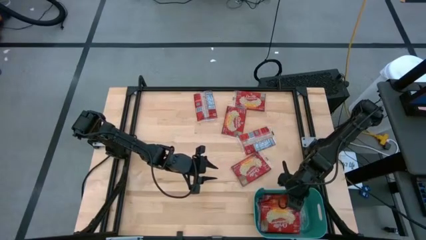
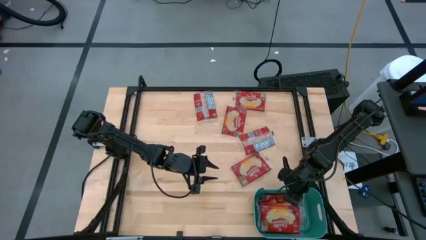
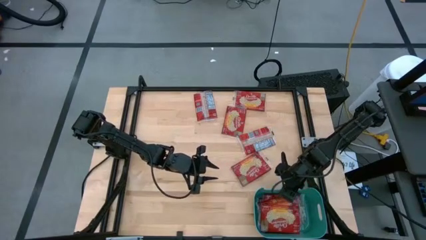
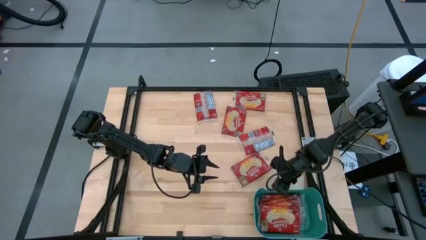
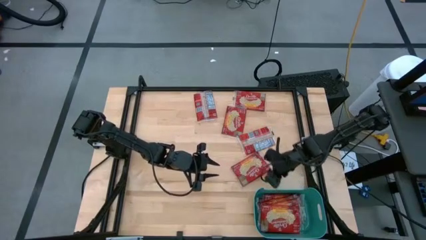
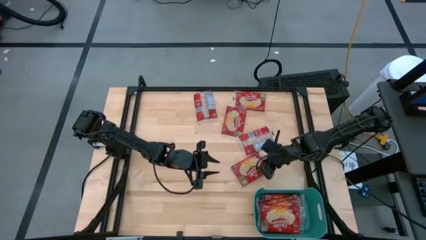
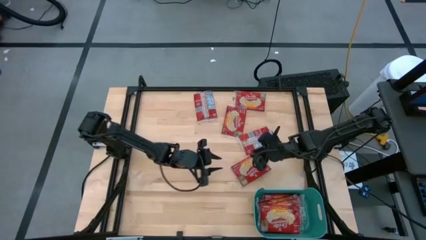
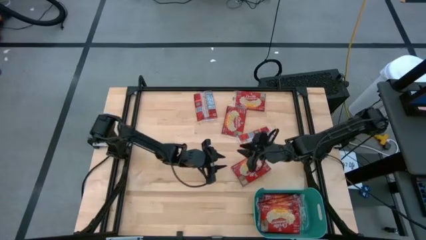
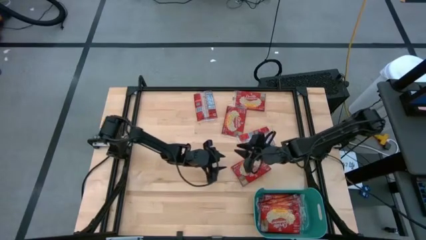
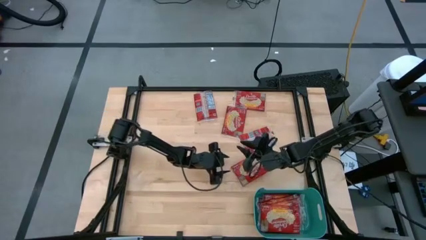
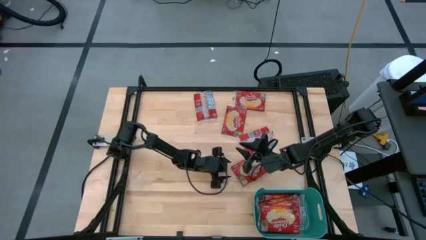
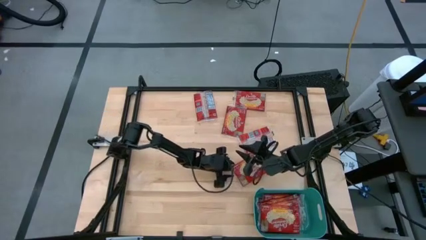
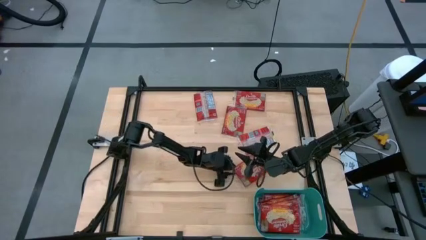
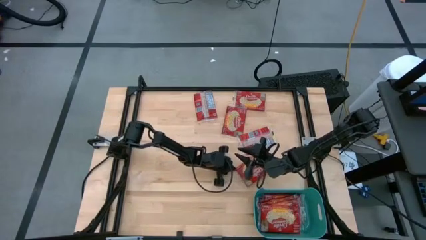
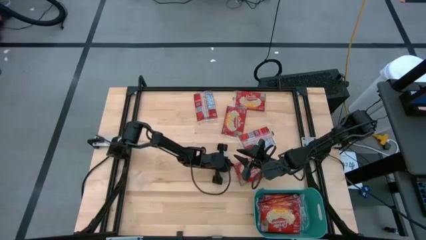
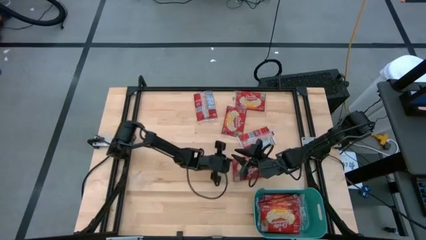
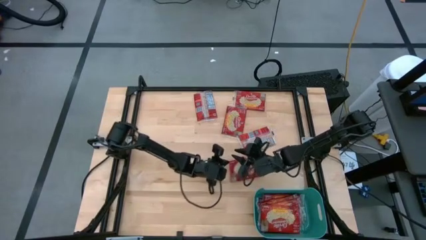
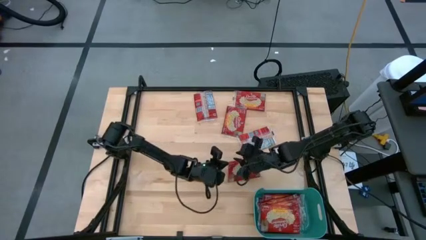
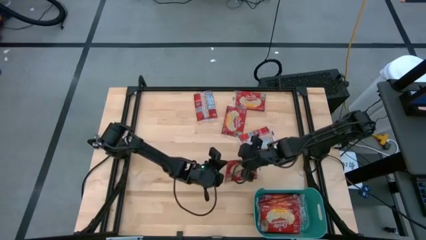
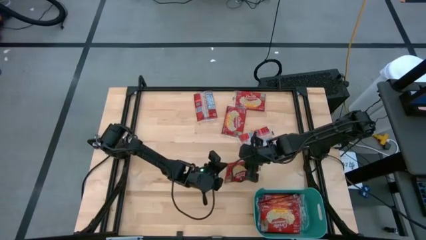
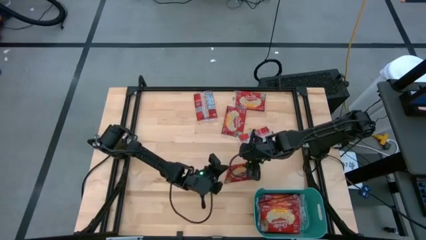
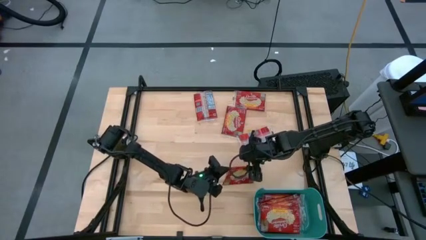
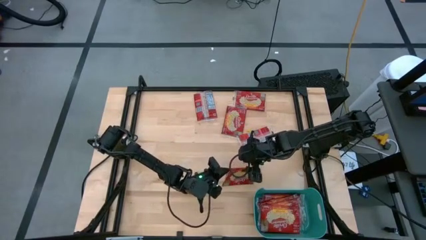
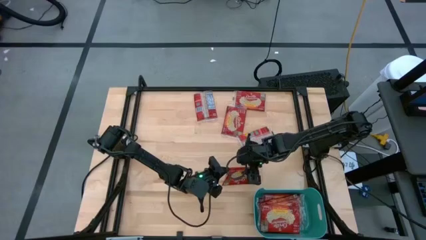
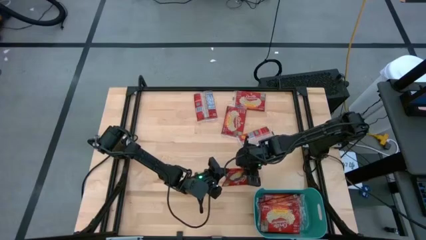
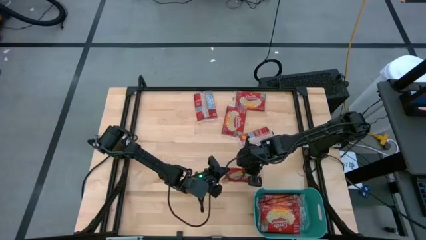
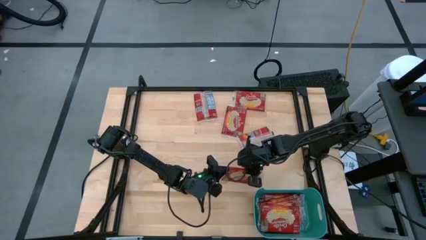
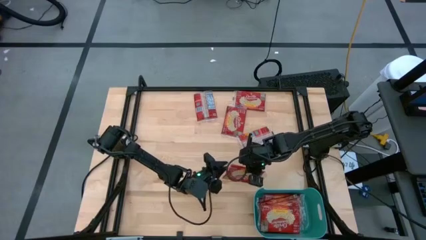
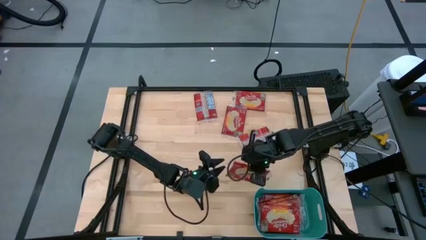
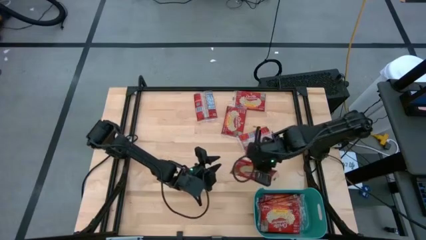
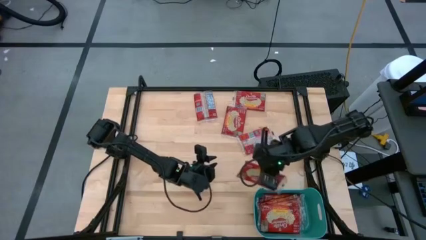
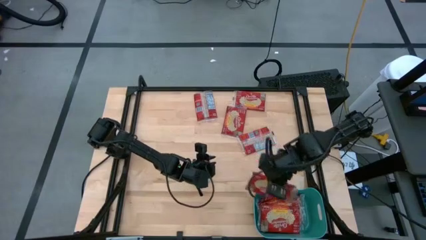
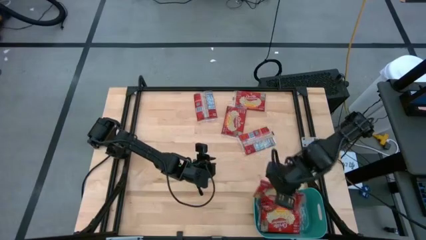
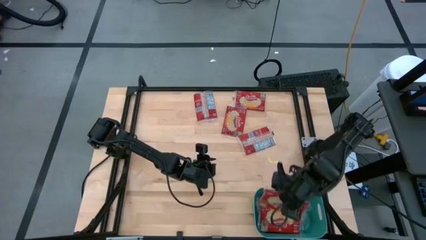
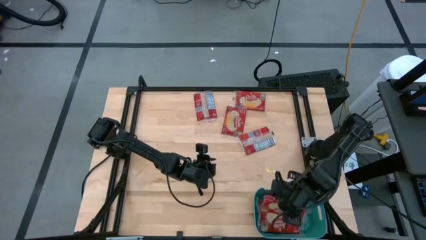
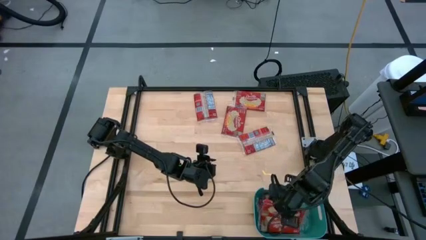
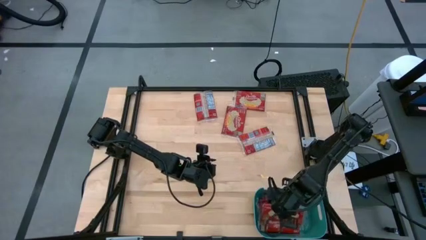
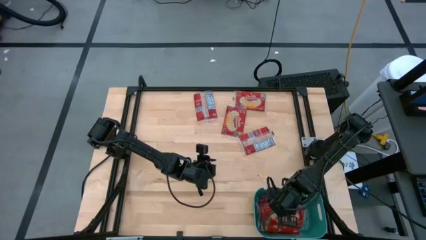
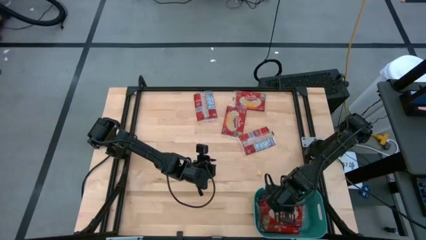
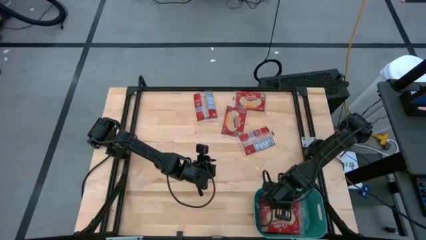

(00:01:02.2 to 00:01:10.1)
Task: Sort popcorn bags into baskets
Put the popcorn bag into the green bin

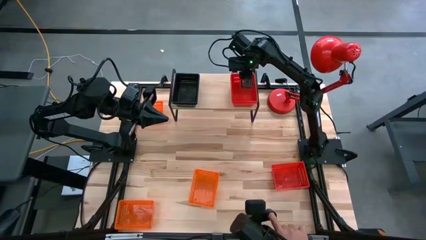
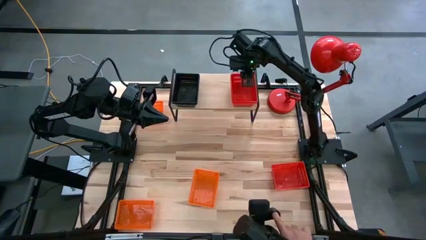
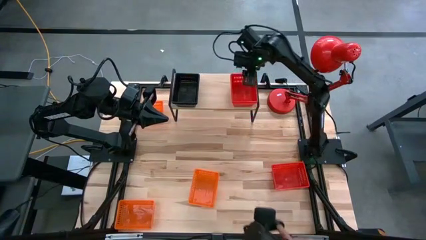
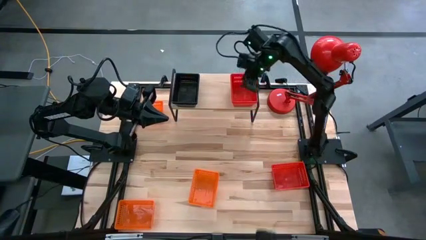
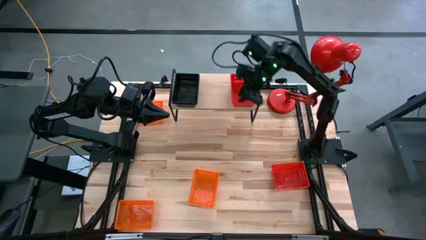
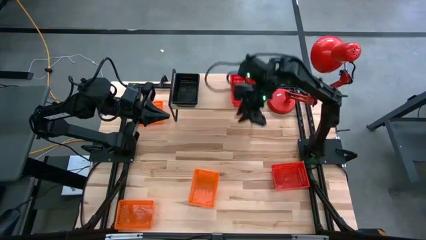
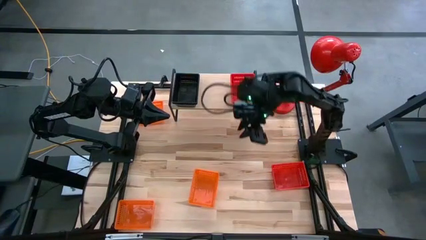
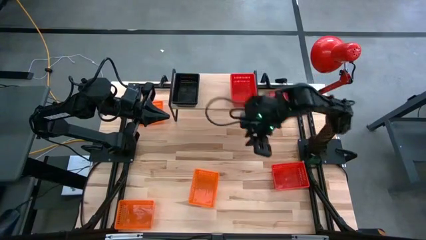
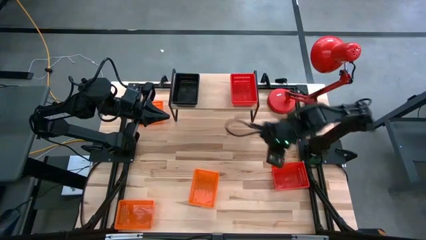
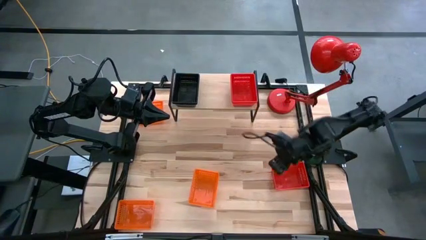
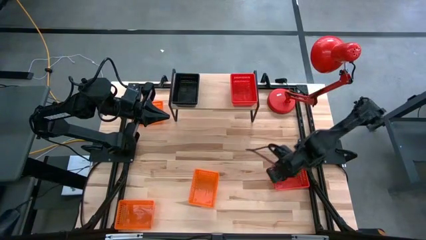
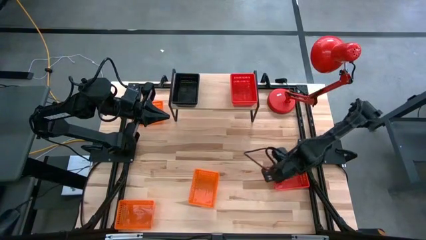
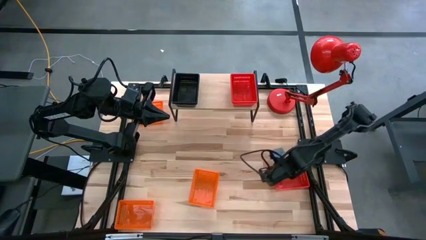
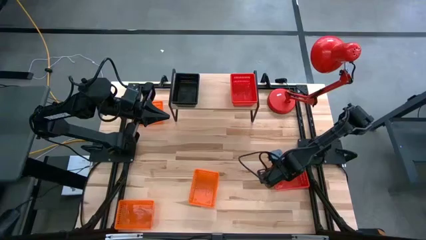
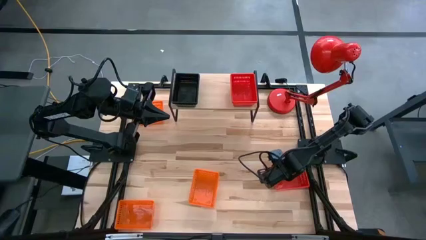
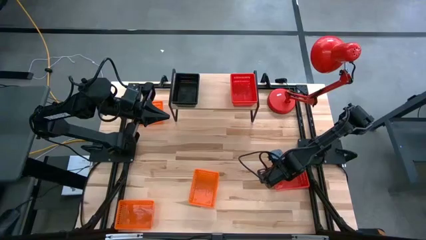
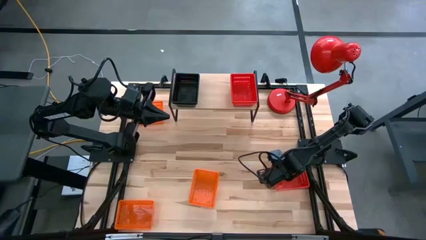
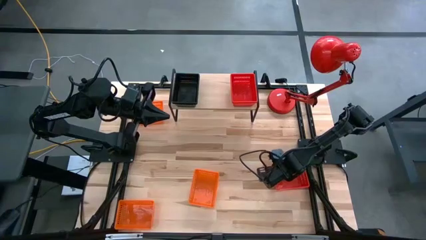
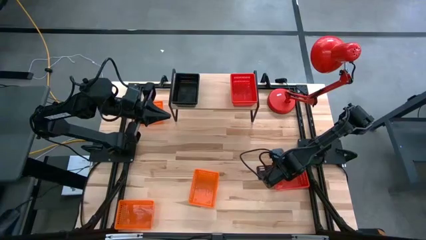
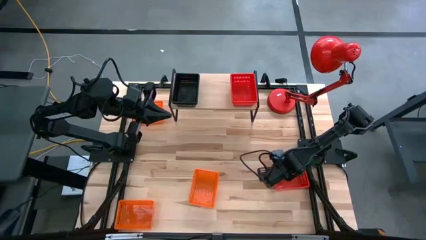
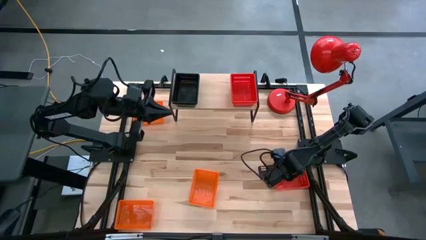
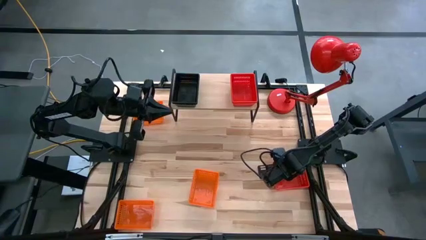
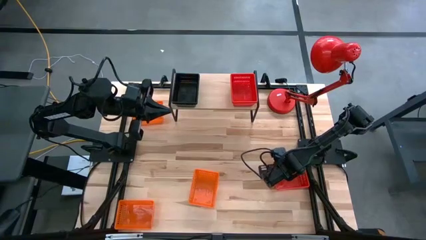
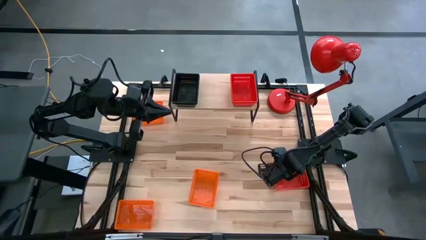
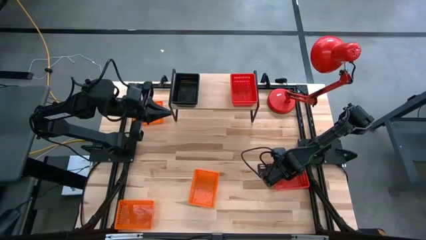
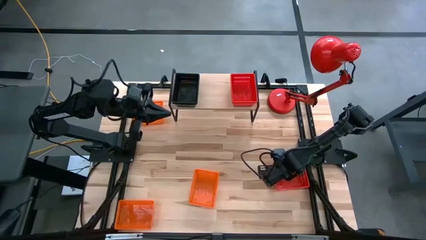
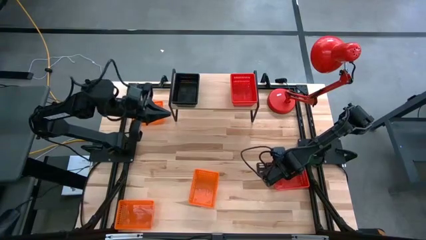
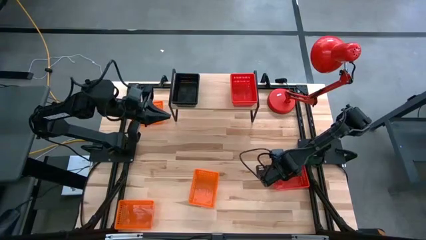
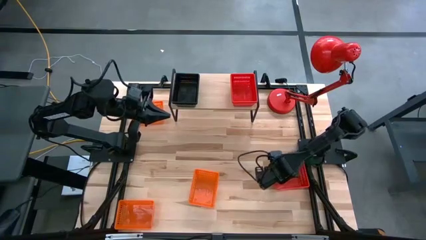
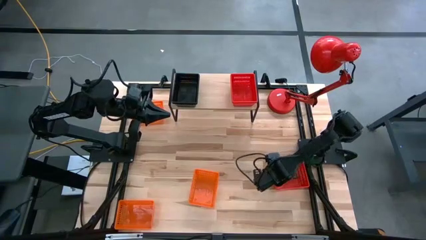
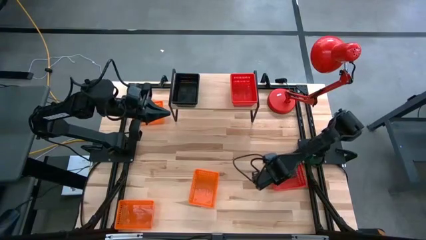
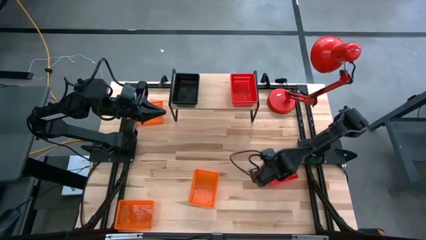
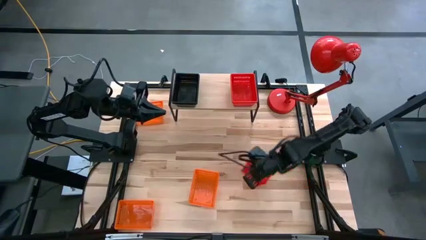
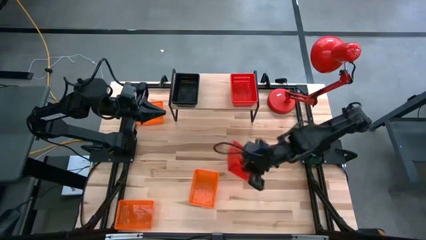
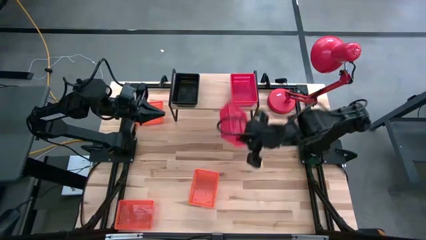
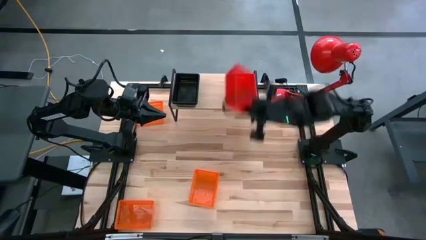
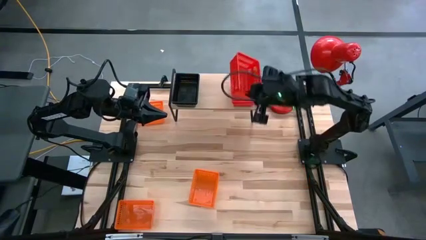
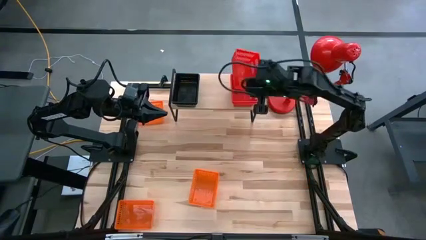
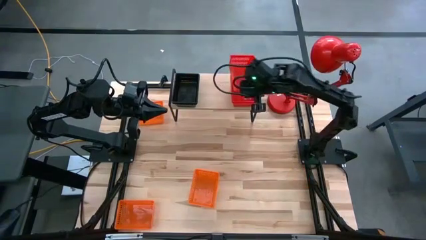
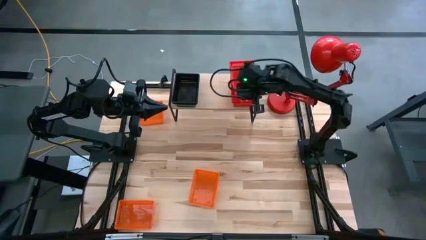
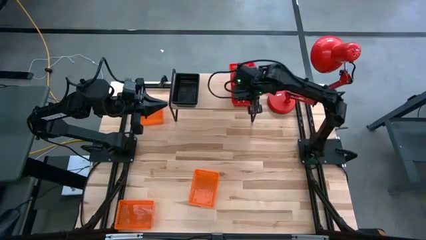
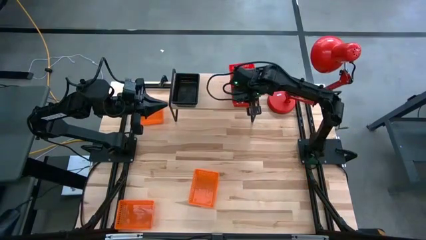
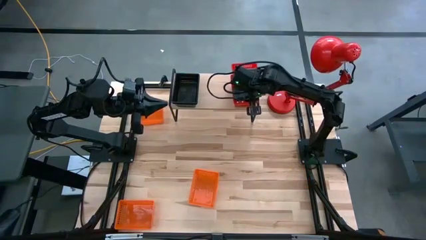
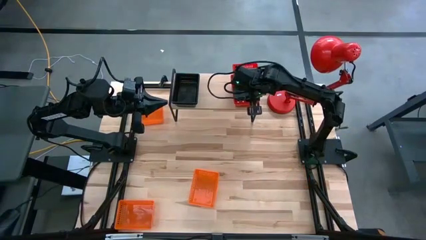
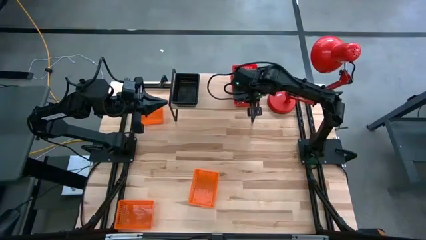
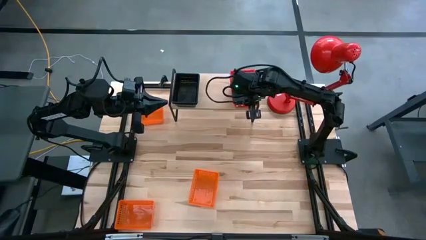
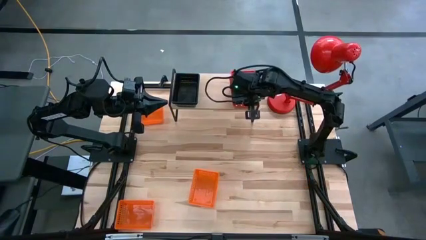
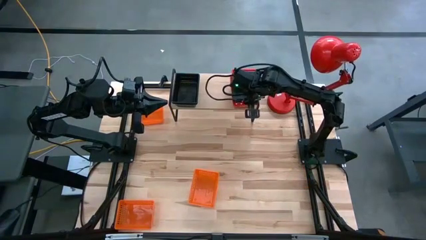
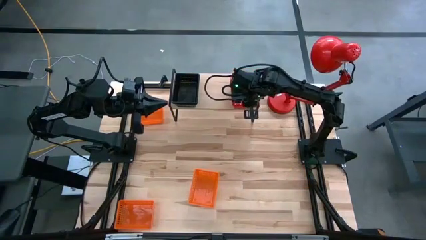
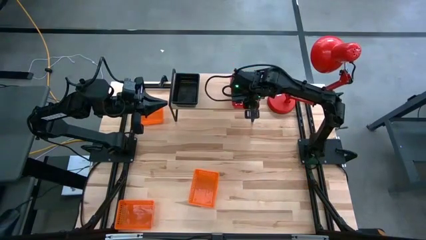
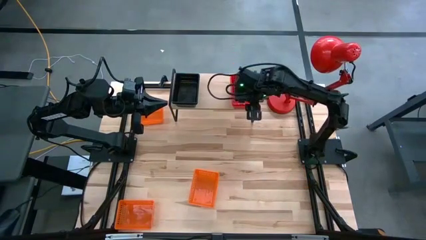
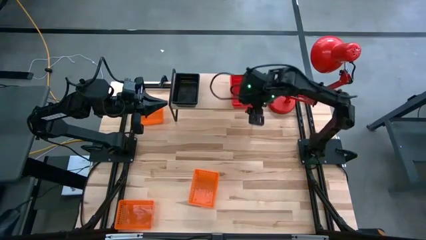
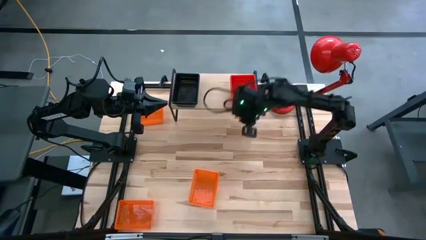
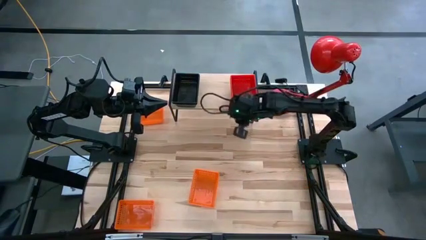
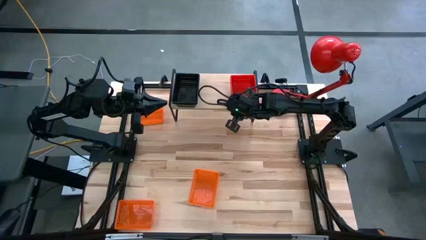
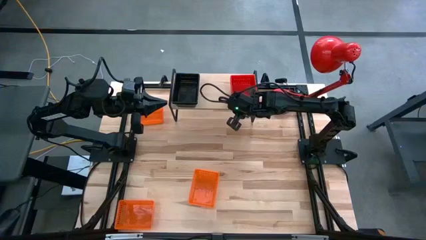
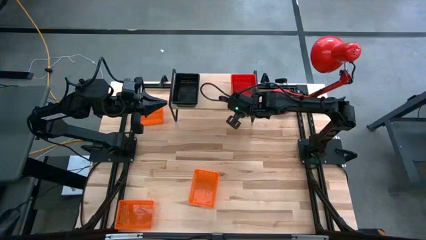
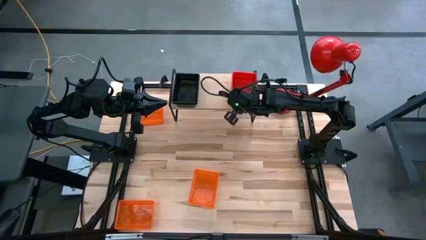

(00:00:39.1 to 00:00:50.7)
Task: Stack baskets on shelf by color
Stack the red basket on top of the stacked red baskets on the shelf
